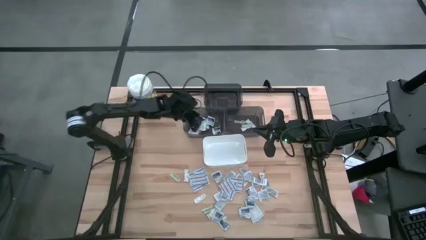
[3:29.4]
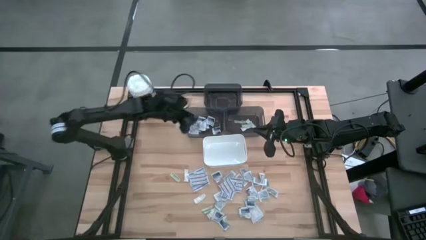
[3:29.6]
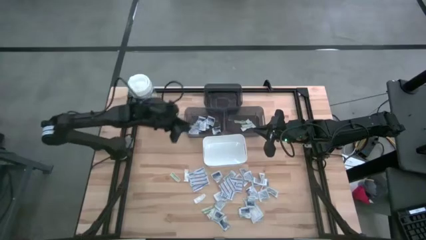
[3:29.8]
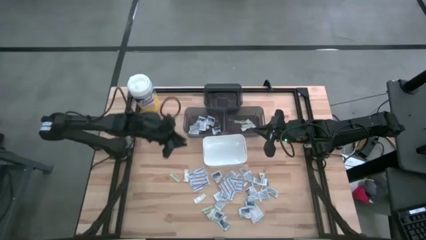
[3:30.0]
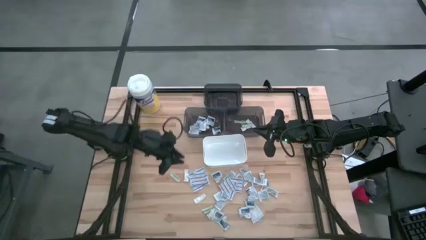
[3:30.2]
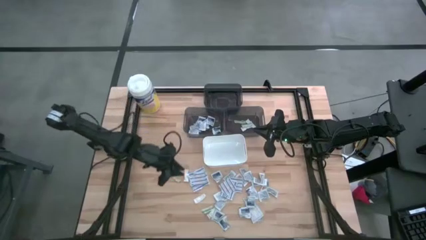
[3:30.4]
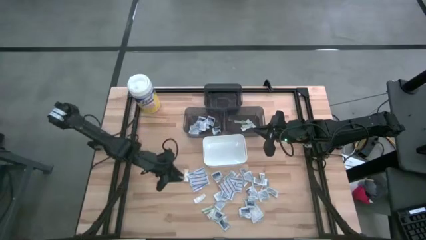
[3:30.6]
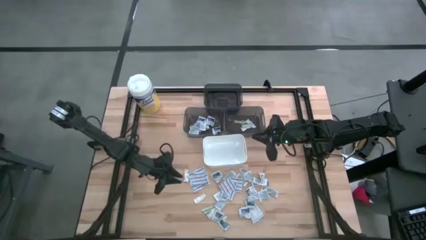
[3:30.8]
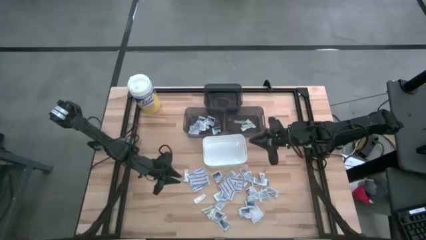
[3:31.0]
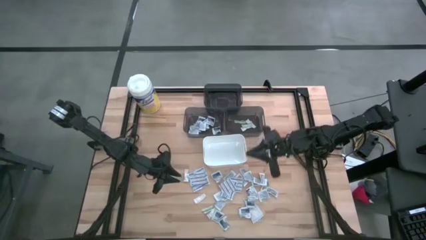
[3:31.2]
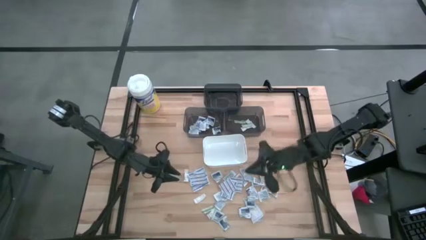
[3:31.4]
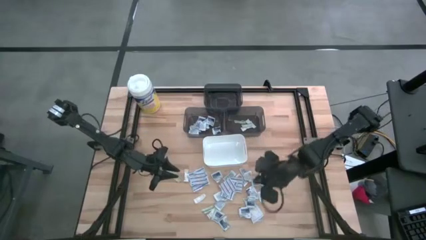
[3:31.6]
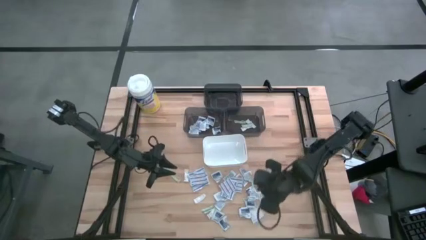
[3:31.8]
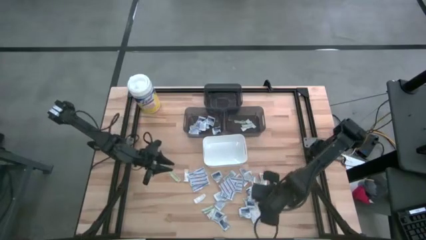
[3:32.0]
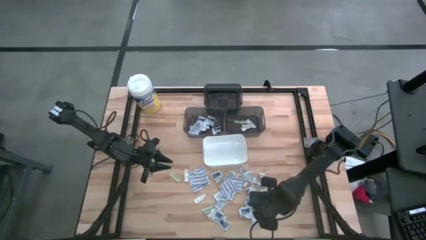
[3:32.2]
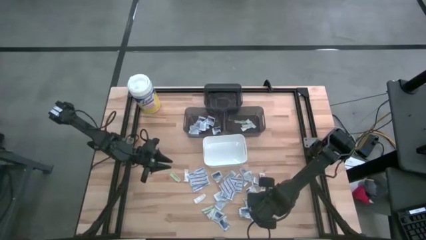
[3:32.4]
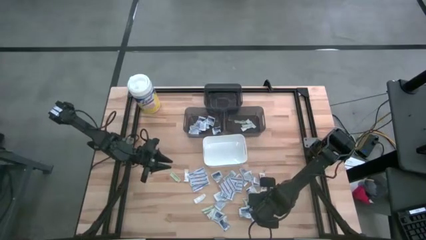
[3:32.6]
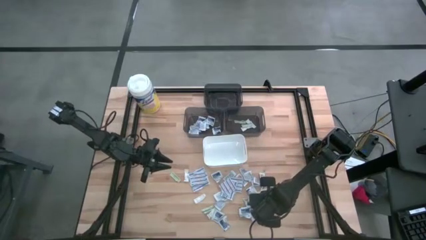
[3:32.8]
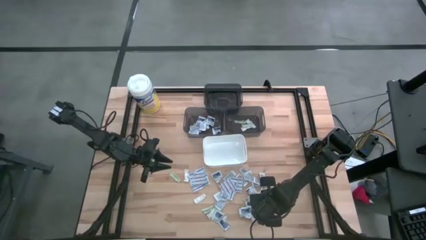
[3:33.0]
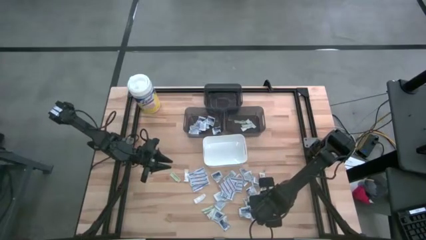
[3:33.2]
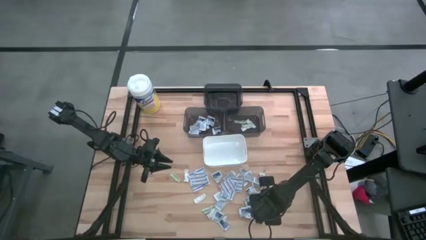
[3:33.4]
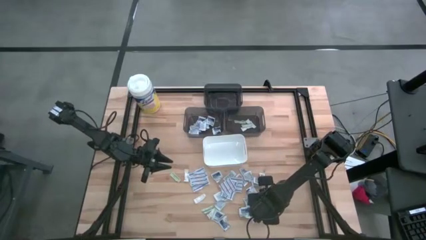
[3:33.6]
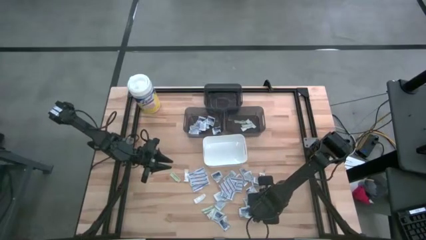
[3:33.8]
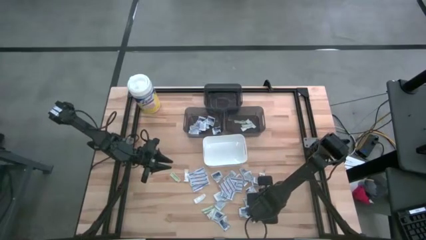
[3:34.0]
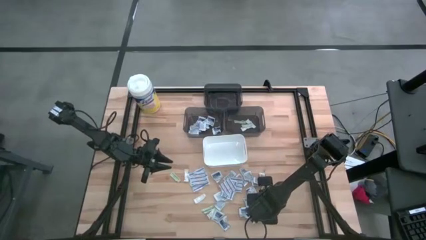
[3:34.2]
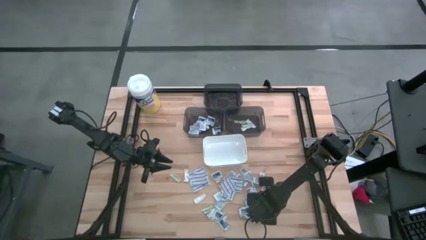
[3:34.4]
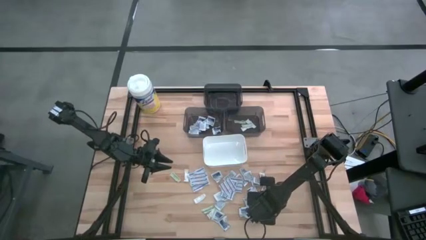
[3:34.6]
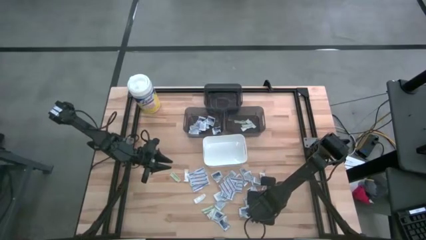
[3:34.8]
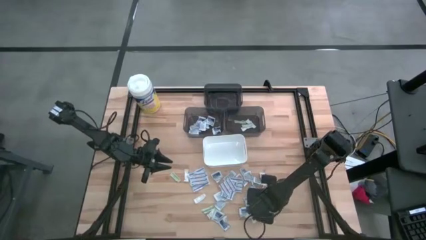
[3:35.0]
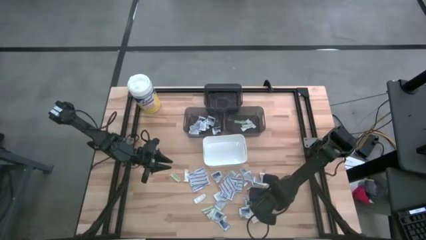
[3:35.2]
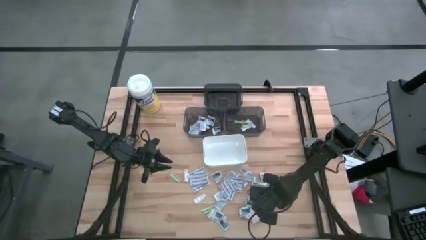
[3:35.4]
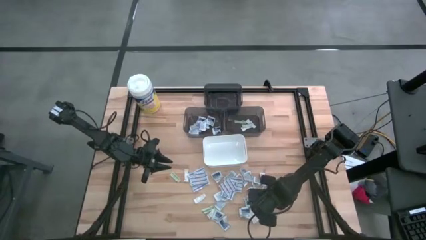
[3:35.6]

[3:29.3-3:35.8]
Task: Pick & Place First Aid Supplies
Put the alcohol pad into the bottom left black bin

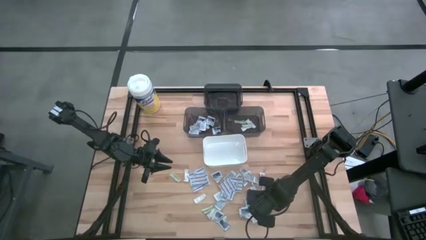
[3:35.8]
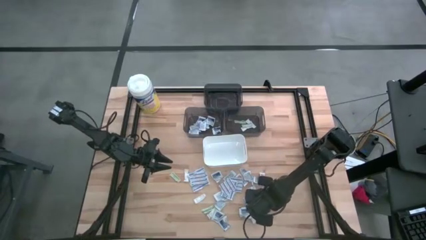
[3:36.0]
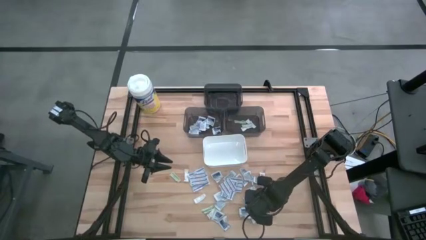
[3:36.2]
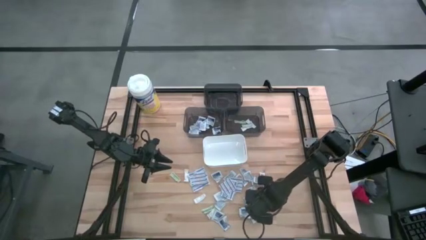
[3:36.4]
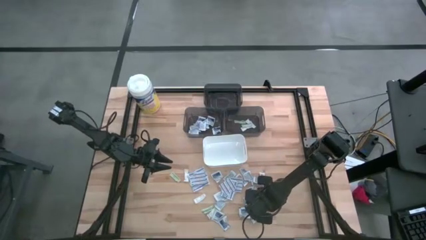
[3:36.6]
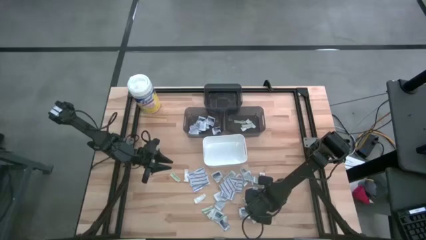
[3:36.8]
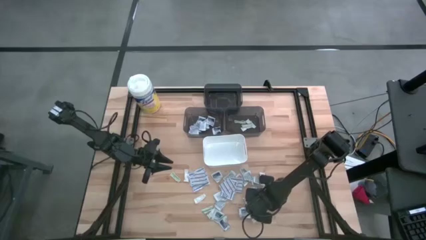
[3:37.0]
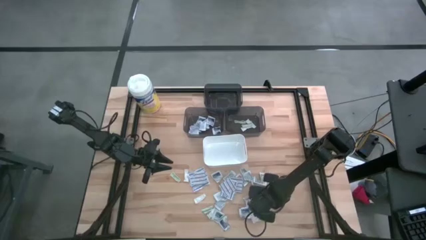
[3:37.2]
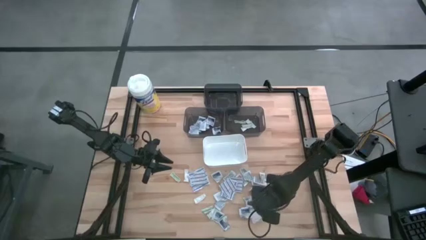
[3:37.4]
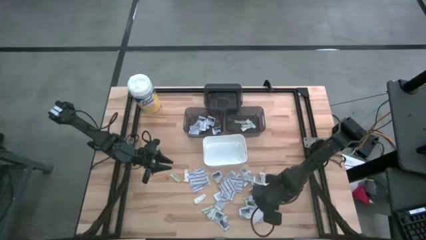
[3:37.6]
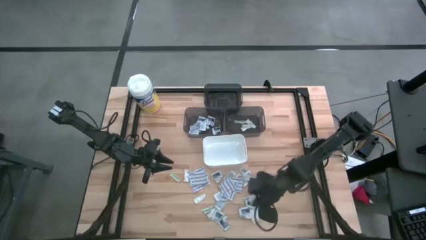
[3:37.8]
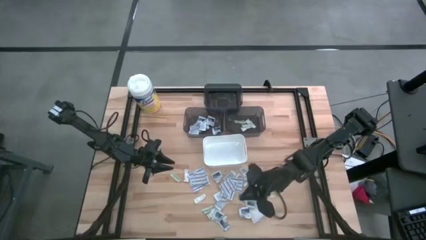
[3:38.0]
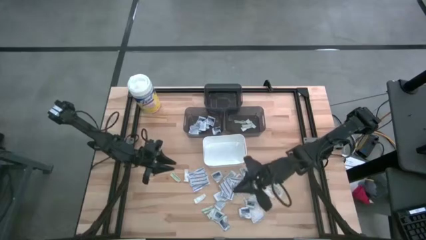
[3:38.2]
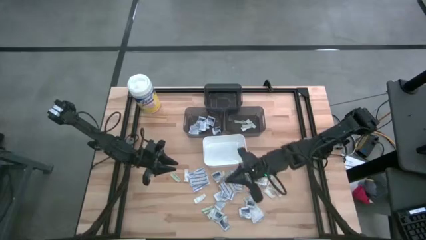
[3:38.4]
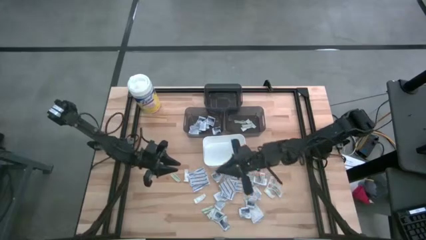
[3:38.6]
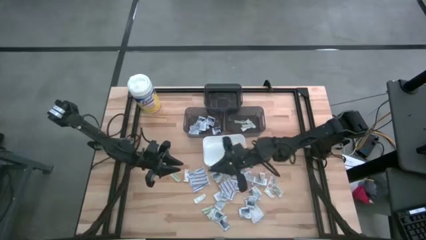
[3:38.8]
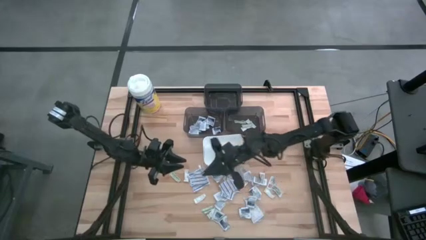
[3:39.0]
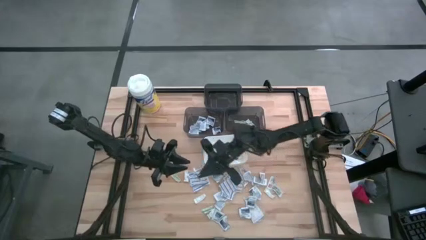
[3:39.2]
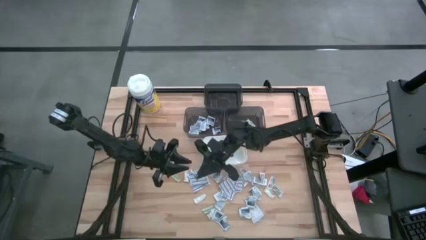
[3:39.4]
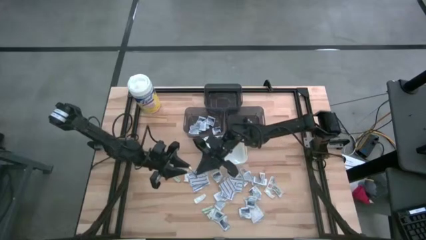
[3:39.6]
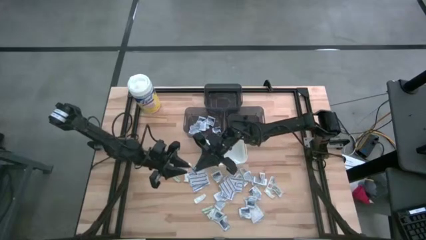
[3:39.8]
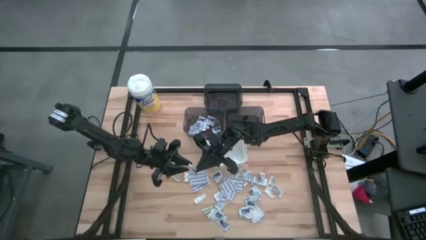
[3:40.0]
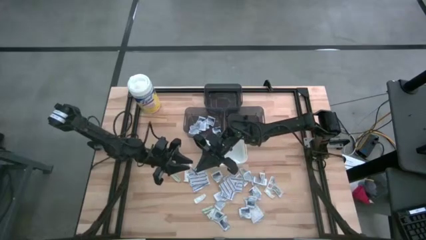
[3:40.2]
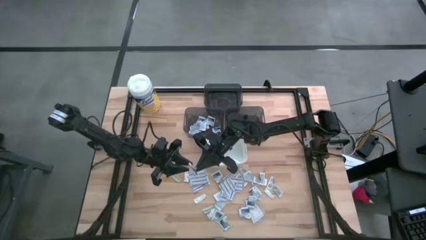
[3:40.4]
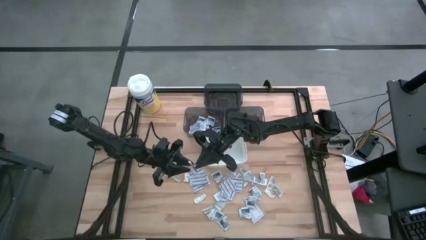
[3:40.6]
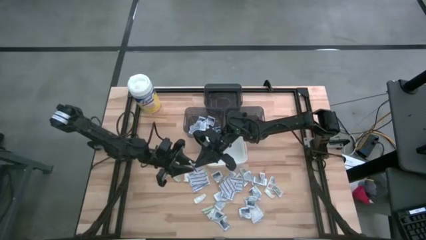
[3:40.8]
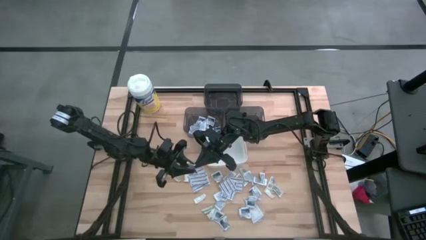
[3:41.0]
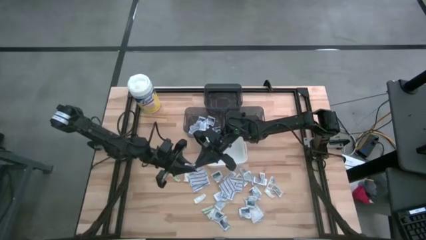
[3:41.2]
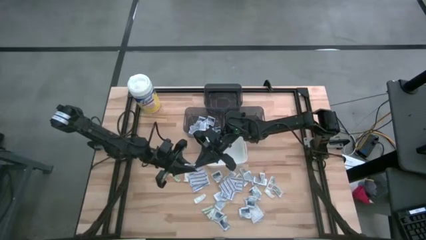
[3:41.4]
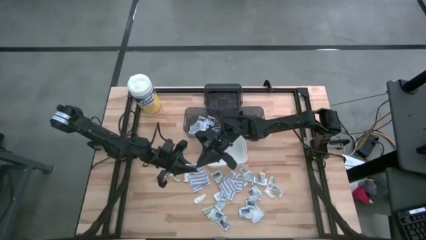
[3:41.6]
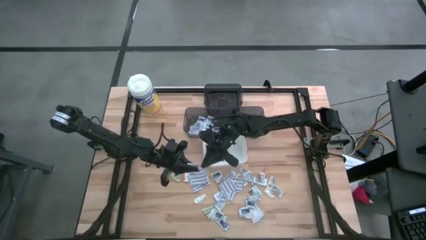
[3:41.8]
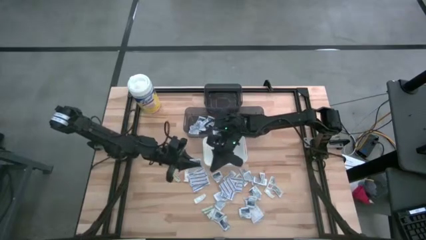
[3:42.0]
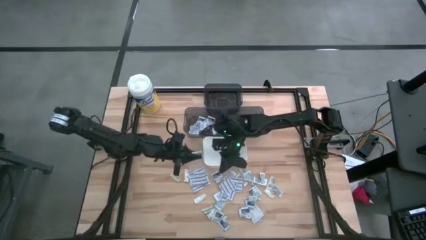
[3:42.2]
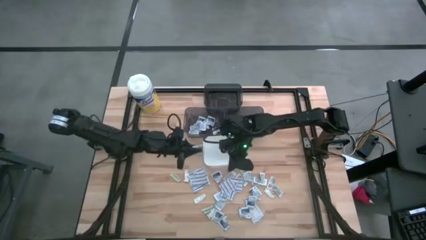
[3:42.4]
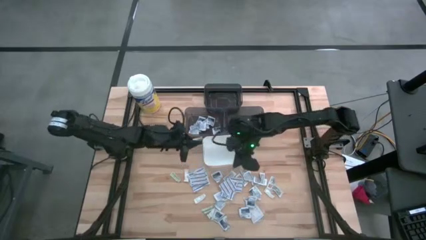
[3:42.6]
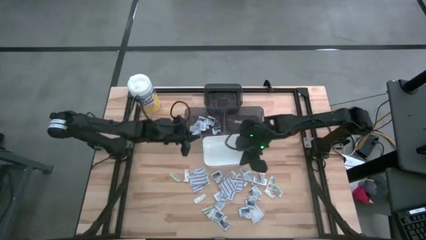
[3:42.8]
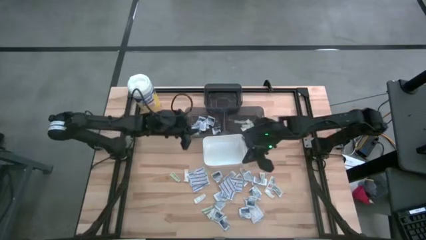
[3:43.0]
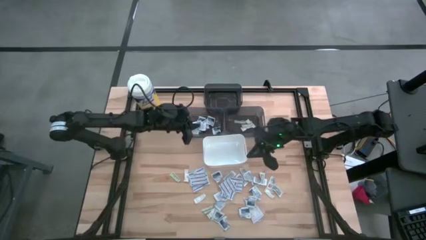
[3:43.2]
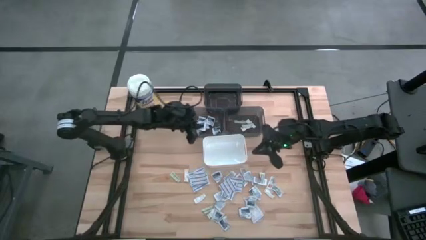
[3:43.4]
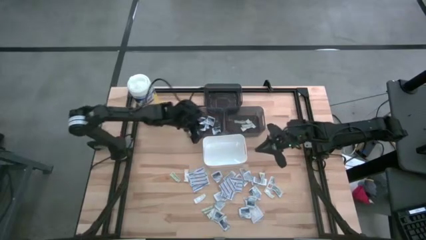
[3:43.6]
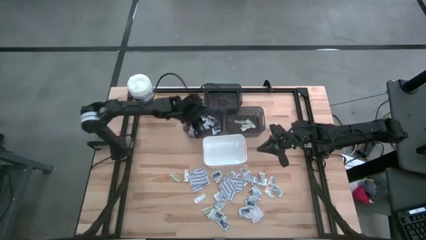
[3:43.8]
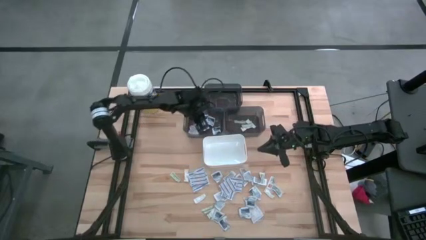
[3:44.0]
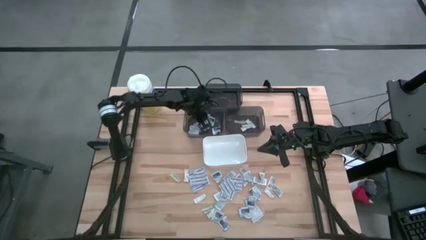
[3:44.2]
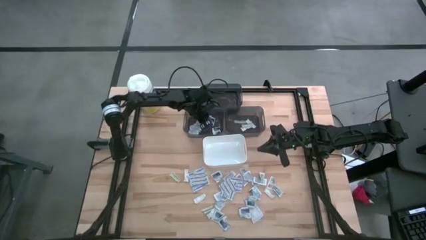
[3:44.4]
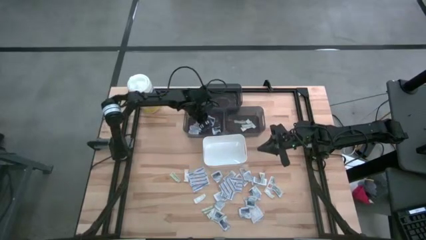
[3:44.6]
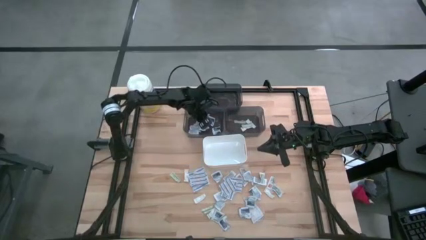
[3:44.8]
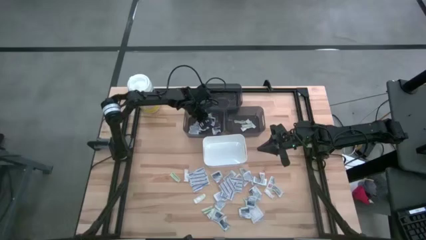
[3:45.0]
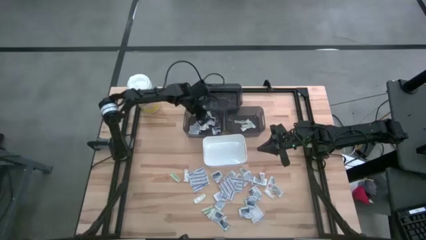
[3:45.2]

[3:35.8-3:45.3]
Put the alcohol pad into the bottom left black bin
